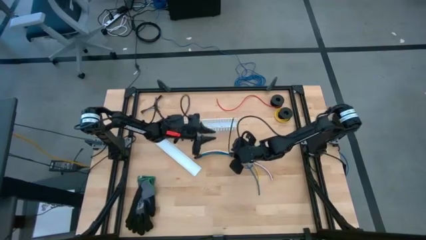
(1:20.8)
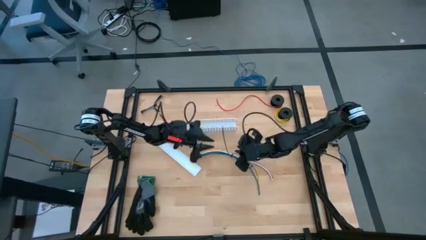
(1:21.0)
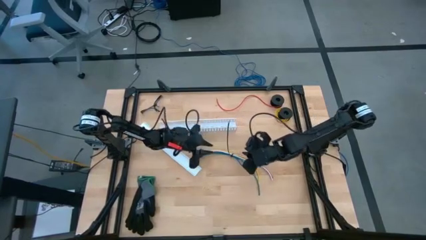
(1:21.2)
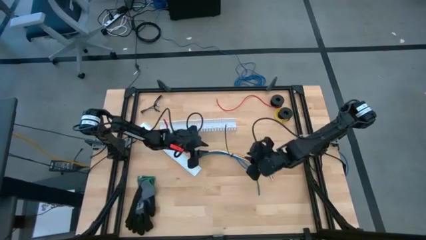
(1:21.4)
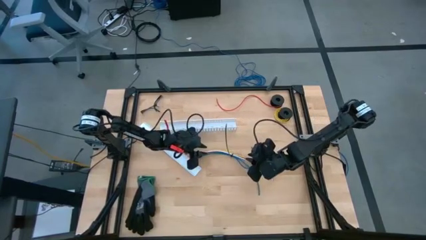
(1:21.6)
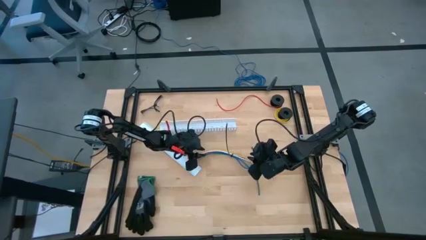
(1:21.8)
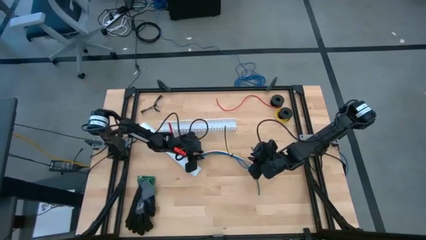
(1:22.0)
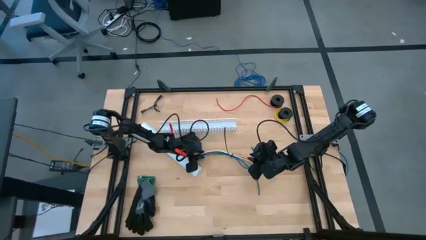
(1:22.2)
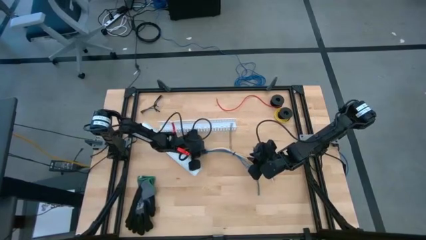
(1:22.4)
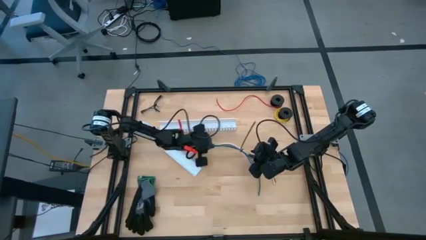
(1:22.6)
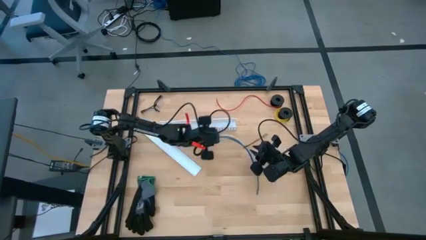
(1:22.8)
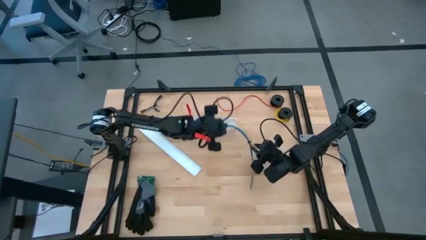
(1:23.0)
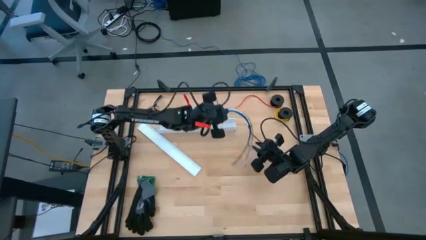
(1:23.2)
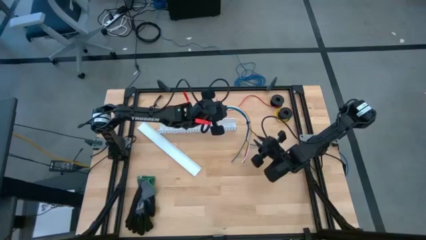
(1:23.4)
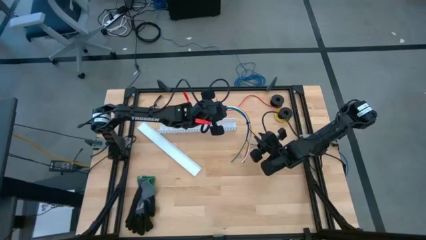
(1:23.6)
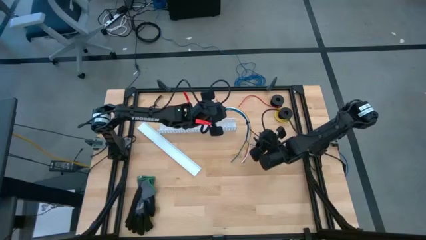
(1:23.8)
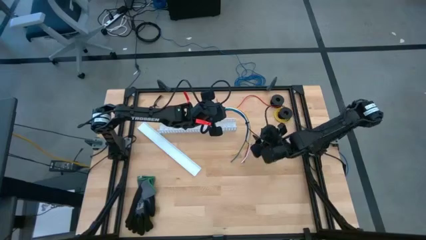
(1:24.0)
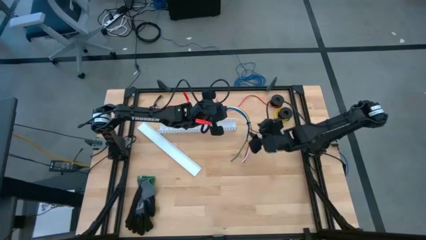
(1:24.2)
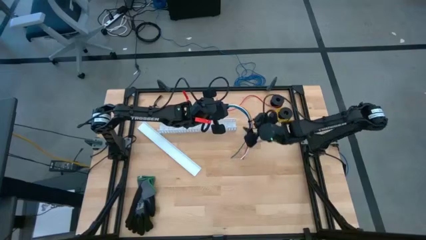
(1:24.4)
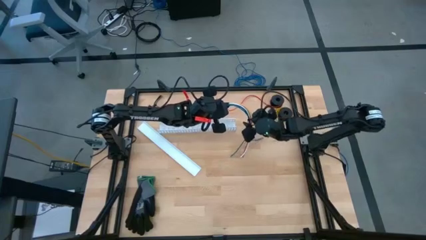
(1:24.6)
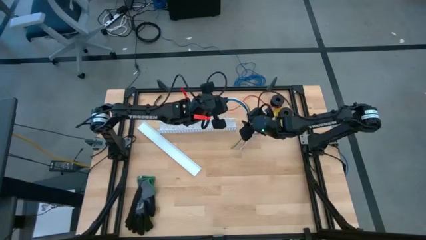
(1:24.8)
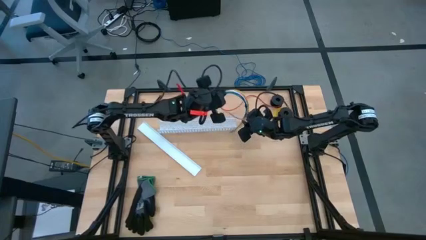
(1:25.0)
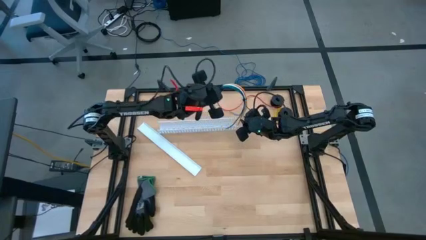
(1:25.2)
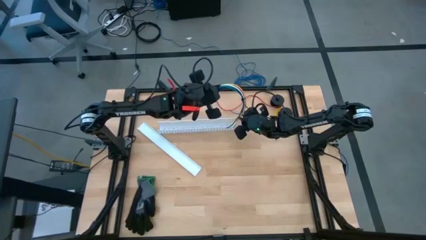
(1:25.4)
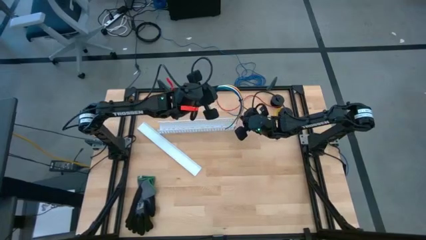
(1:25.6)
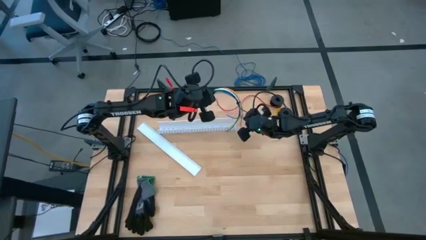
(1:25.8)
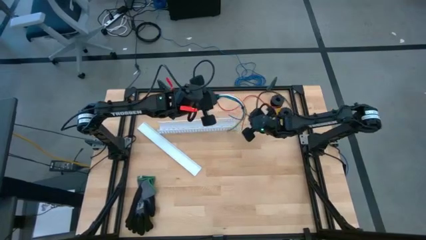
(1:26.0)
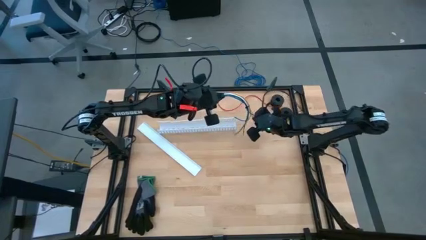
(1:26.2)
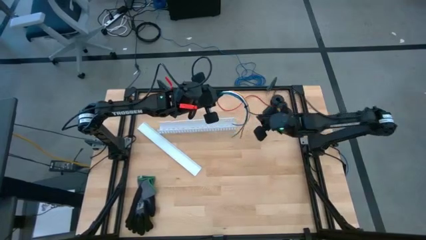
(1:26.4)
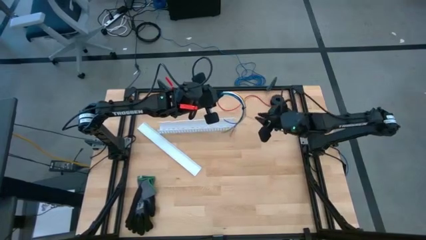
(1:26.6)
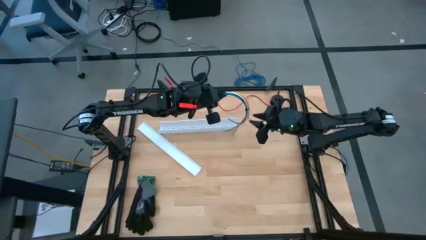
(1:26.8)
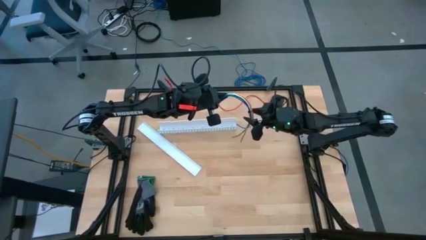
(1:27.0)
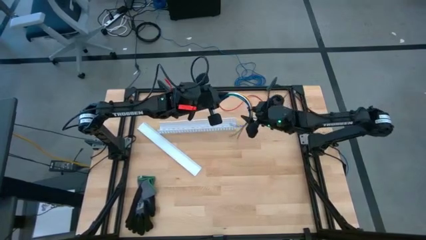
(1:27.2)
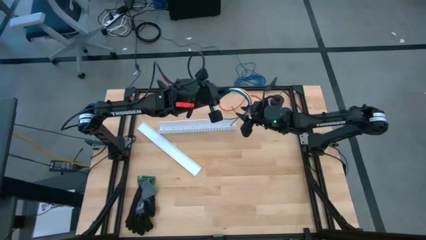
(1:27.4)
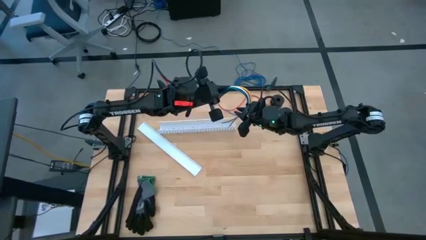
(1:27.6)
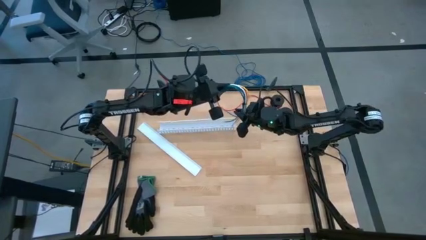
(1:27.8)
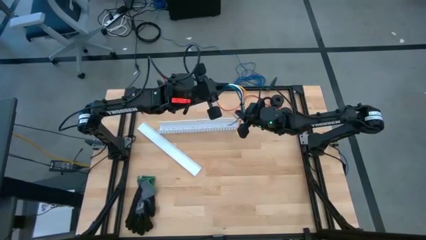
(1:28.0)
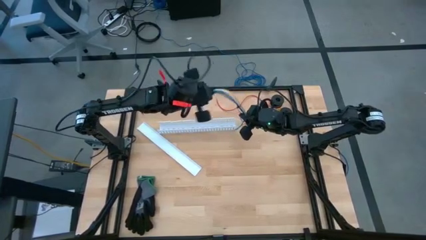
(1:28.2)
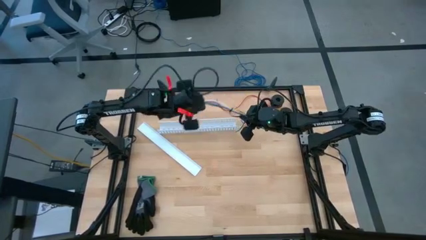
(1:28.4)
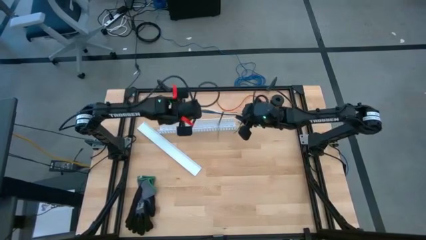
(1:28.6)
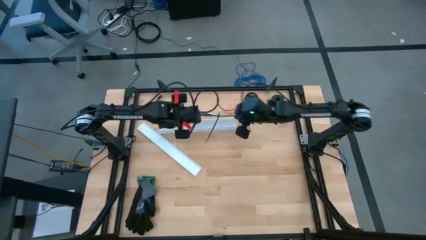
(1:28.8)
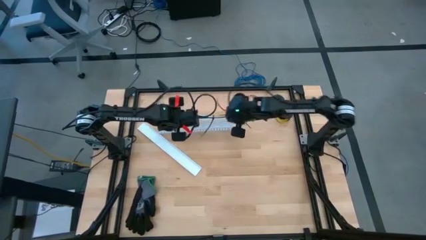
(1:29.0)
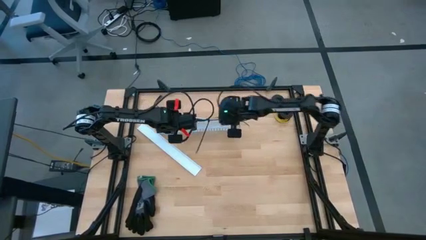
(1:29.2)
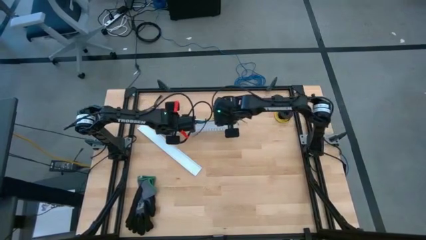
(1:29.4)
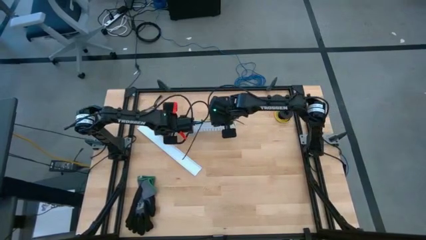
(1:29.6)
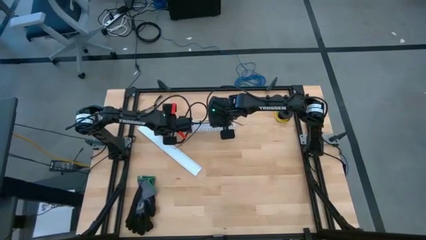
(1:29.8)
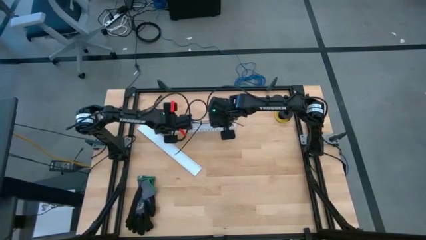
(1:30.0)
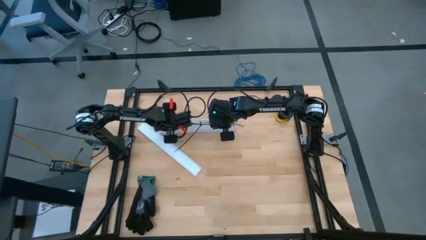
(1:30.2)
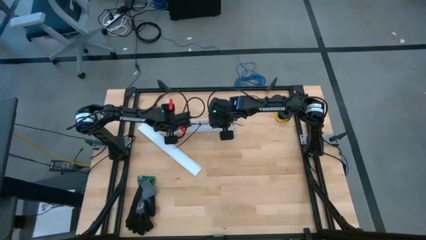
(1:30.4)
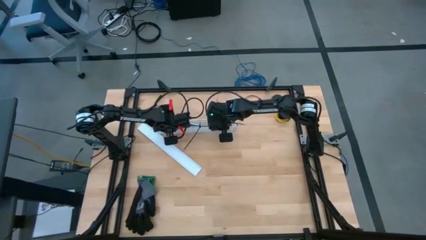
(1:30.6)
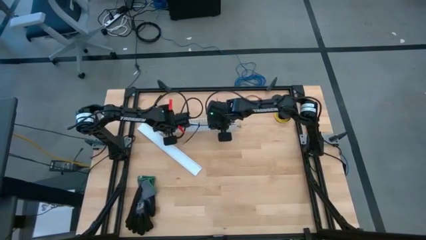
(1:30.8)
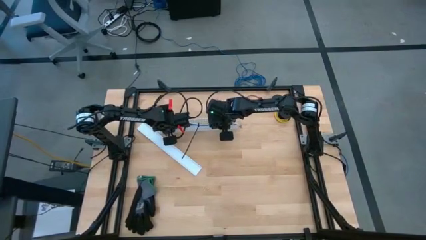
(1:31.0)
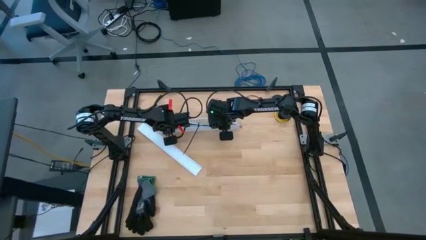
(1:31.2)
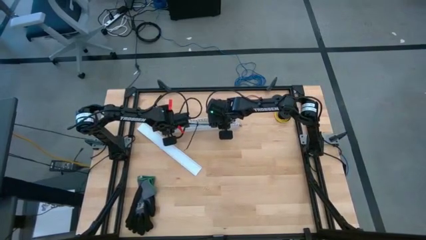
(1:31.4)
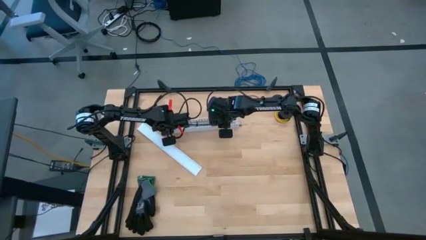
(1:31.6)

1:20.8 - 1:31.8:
Task: Ziptie cables
Put the zip tied cables into the white cable duct

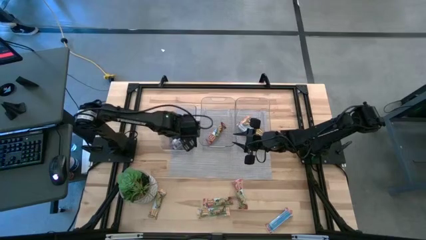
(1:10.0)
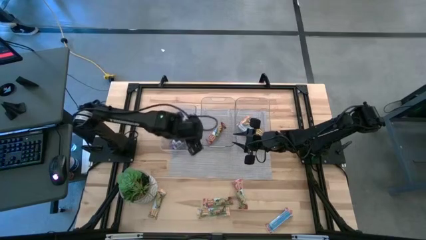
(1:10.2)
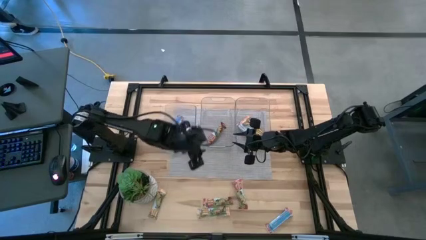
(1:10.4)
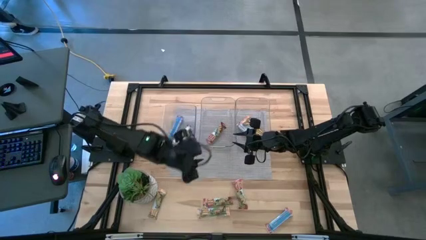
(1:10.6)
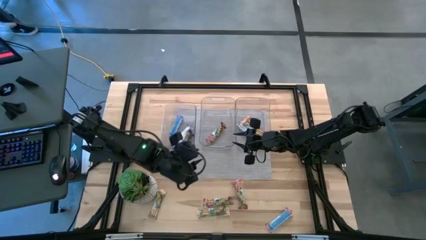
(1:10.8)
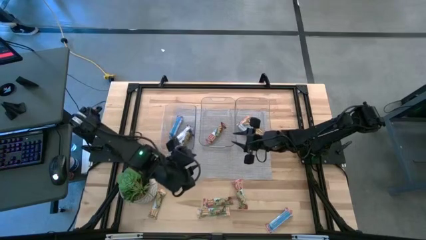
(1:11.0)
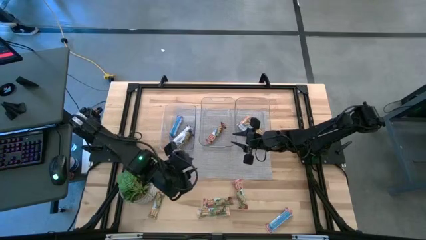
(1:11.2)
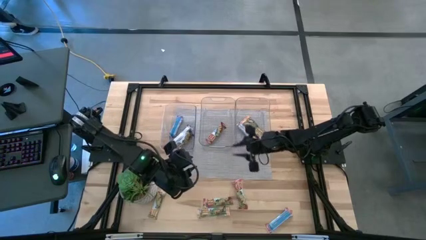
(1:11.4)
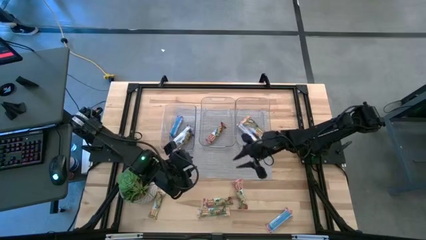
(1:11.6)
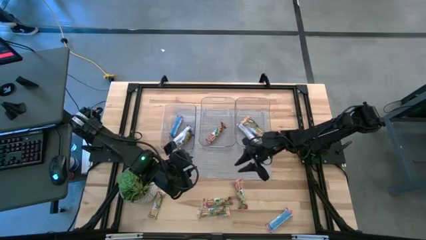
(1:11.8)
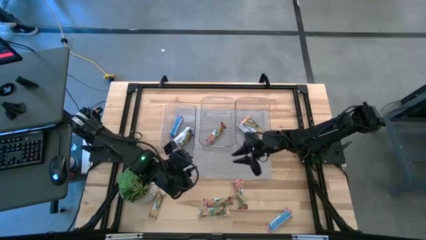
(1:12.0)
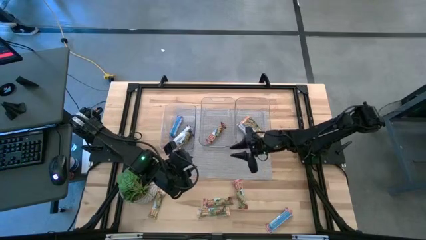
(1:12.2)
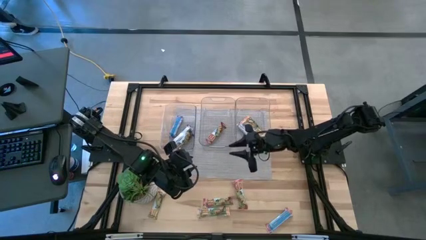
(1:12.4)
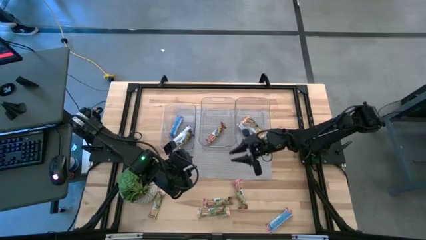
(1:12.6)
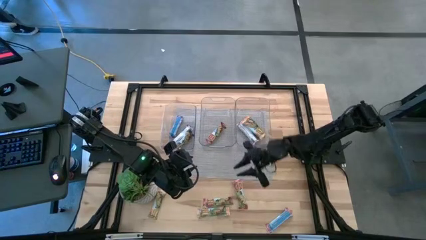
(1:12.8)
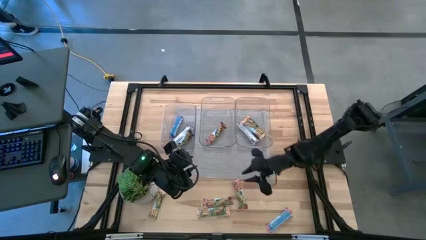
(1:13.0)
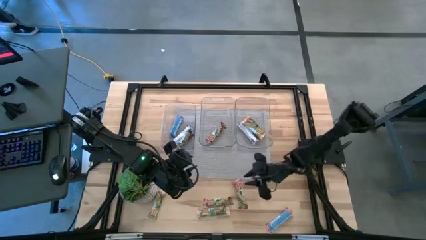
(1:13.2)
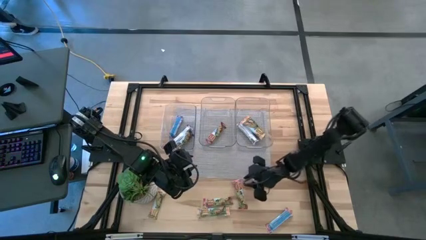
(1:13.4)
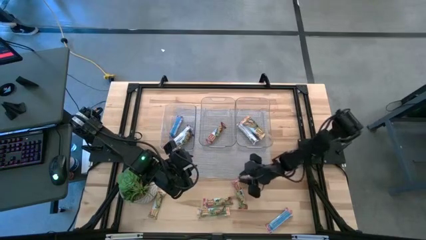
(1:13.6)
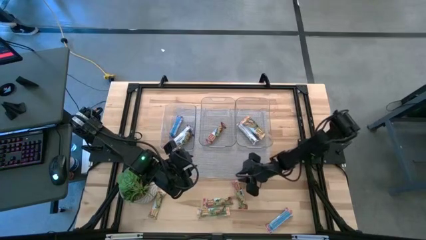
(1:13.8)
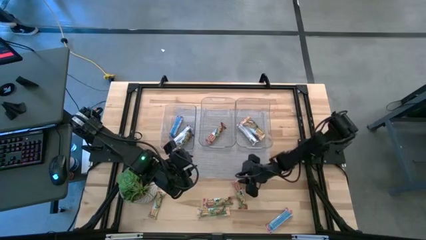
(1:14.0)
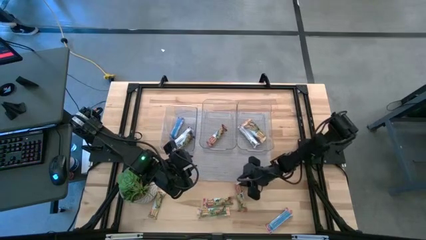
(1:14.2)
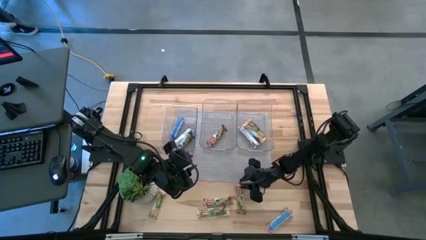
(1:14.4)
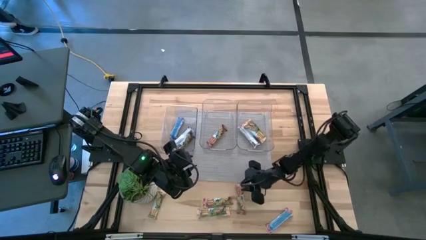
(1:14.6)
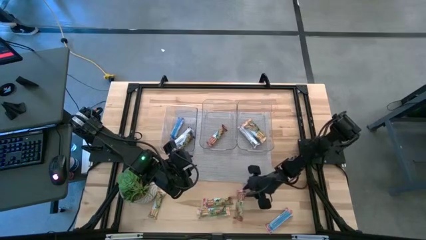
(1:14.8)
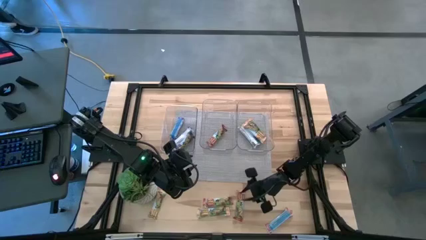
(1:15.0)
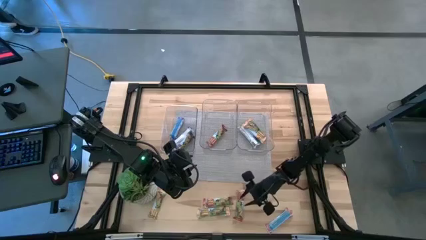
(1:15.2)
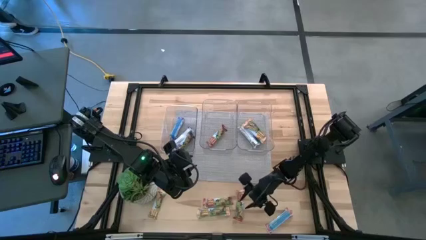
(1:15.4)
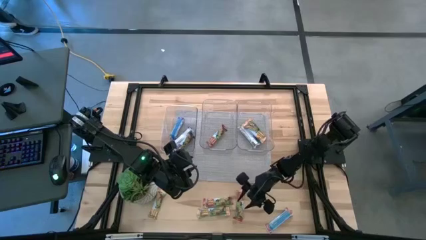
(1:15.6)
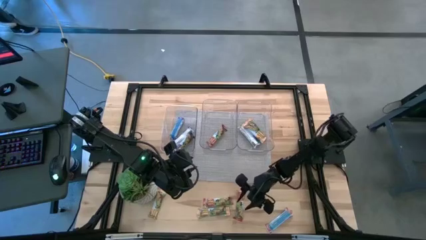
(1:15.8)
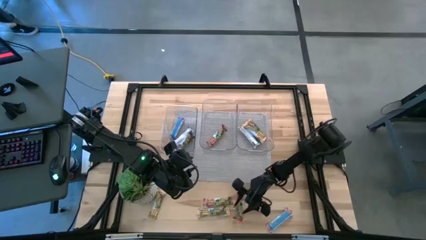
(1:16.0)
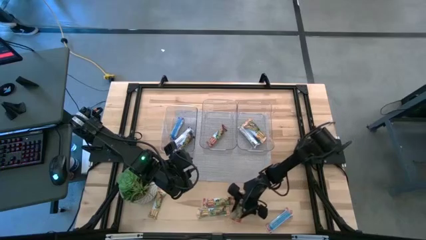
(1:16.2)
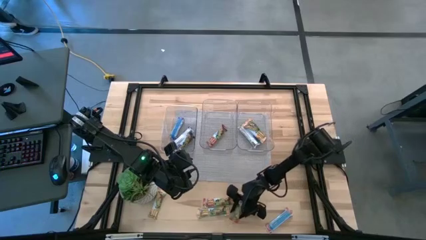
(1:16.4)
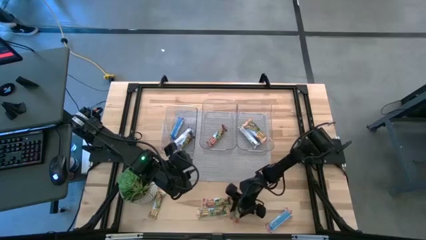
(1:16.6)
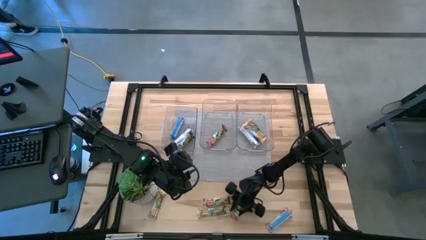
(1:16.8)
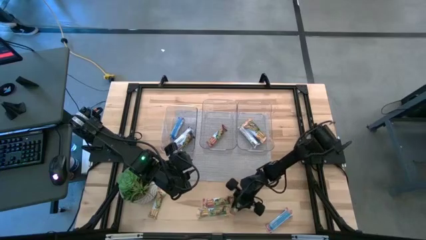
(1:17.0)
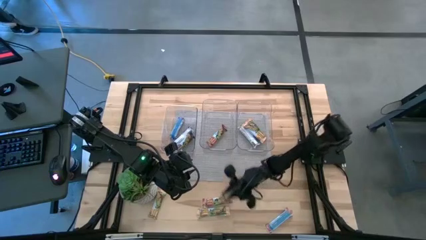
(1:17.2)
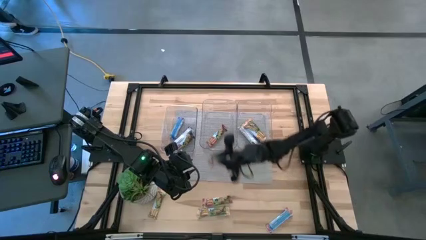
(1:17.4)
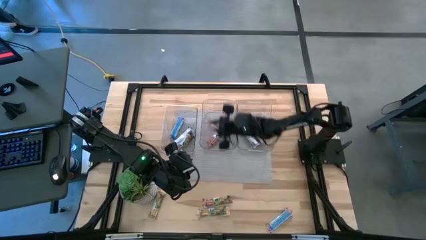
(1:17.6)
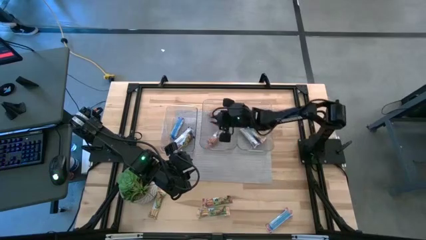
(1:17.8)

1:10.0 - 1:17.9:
Task: Pick and place Granola Bars by type
Put the red granola bar into the middle transparent bin
